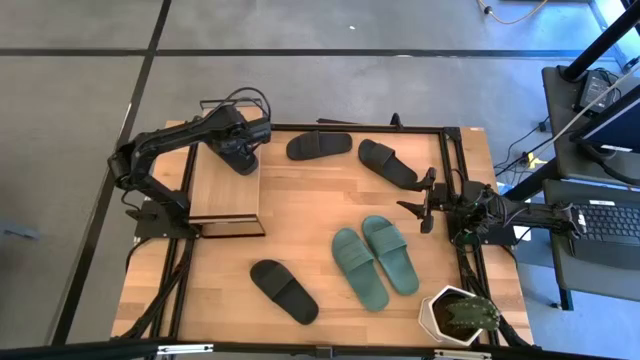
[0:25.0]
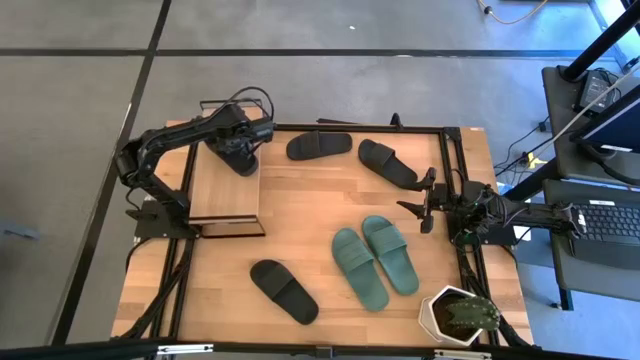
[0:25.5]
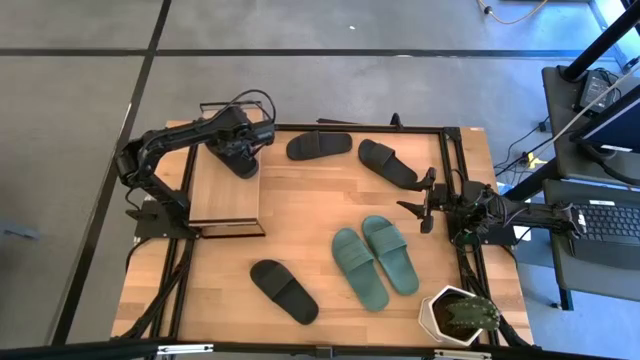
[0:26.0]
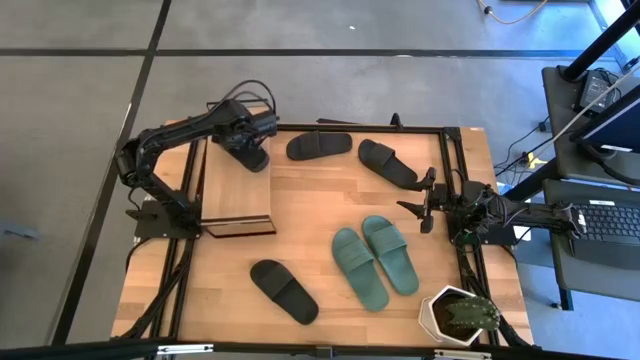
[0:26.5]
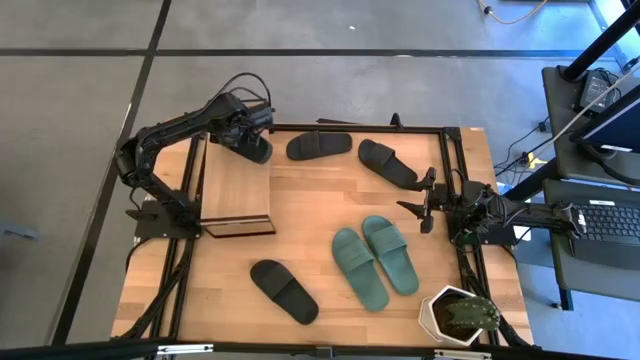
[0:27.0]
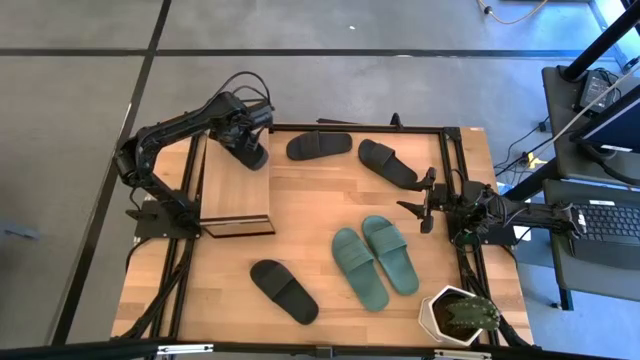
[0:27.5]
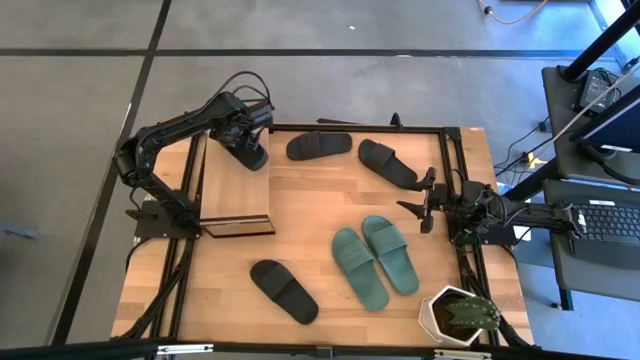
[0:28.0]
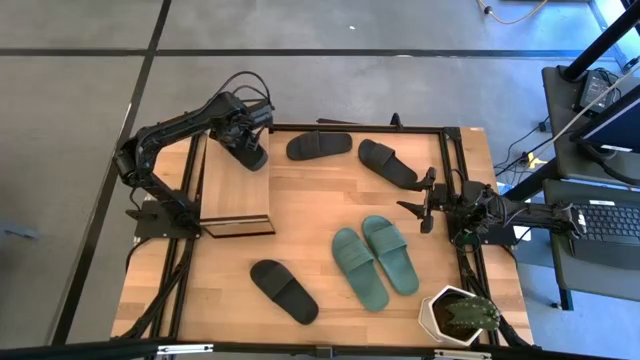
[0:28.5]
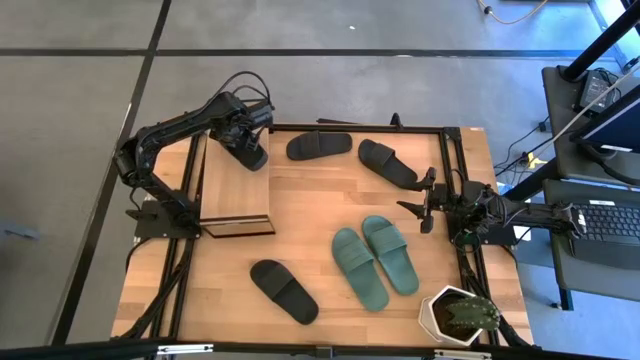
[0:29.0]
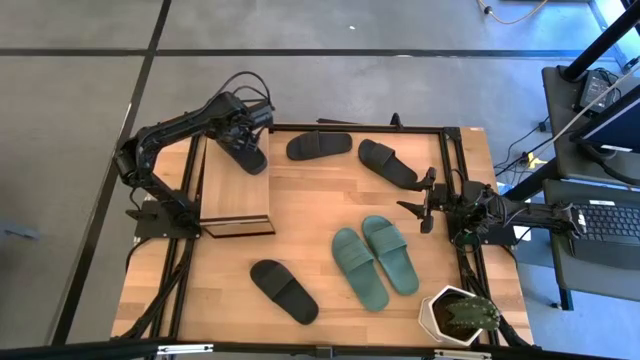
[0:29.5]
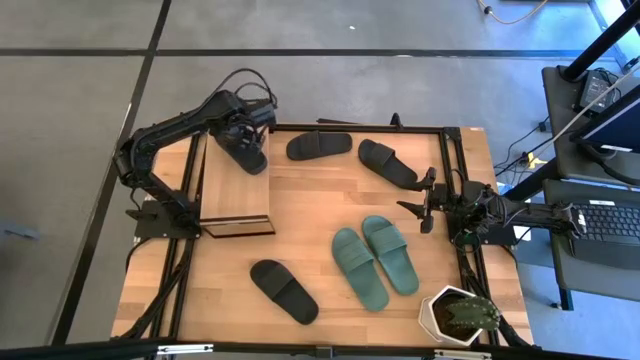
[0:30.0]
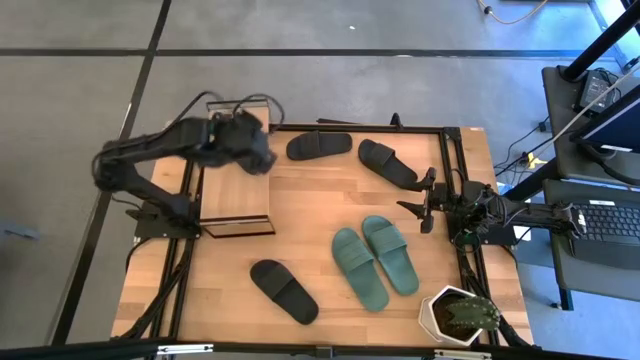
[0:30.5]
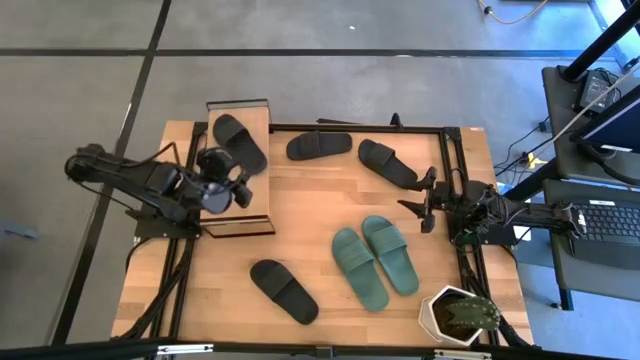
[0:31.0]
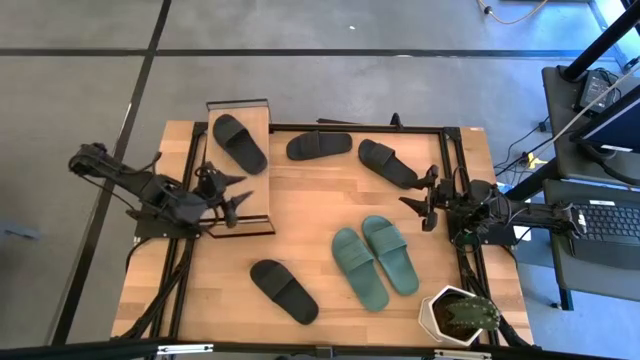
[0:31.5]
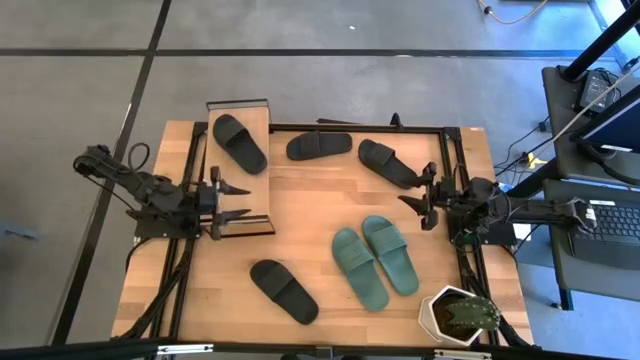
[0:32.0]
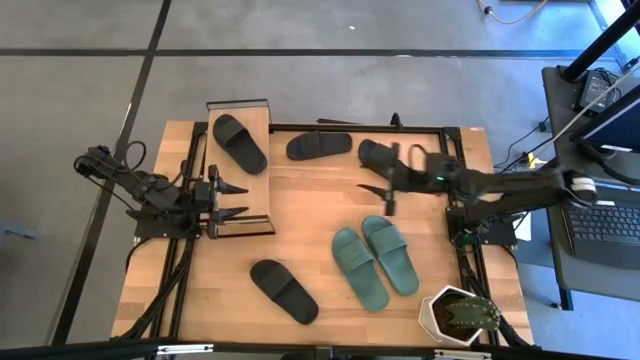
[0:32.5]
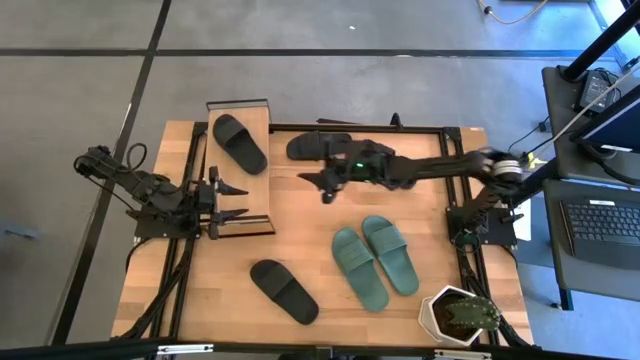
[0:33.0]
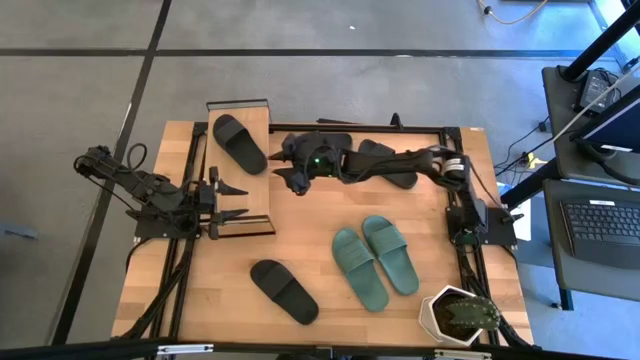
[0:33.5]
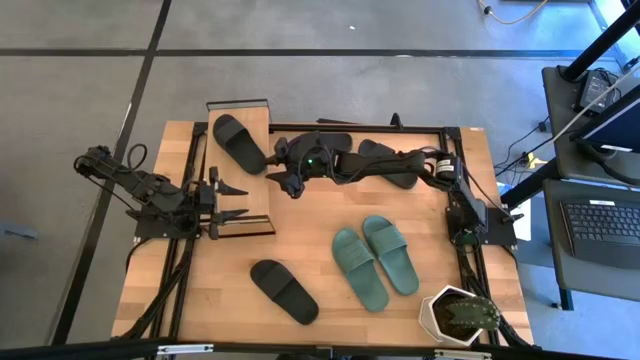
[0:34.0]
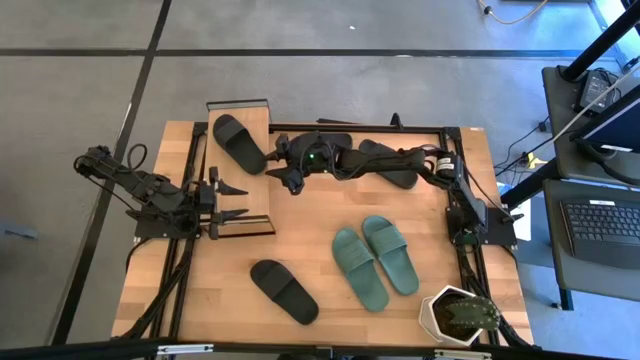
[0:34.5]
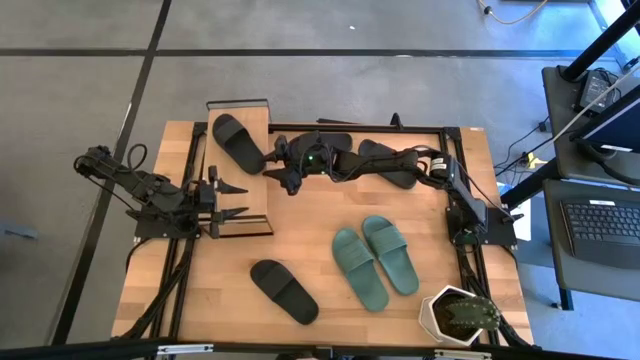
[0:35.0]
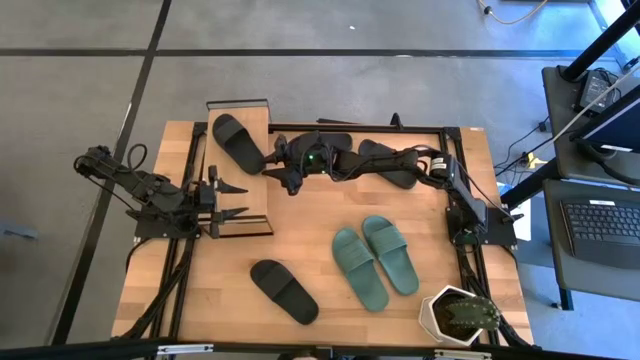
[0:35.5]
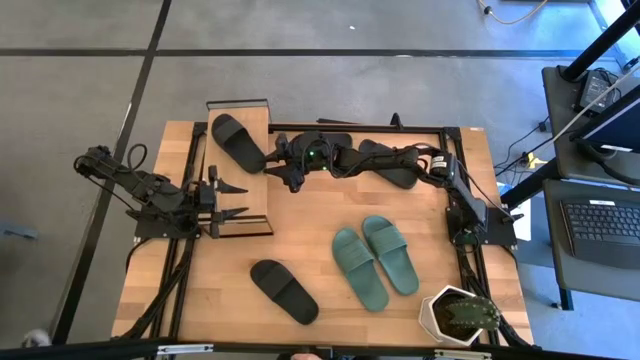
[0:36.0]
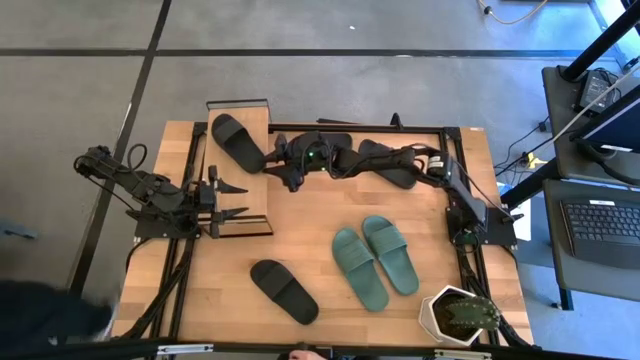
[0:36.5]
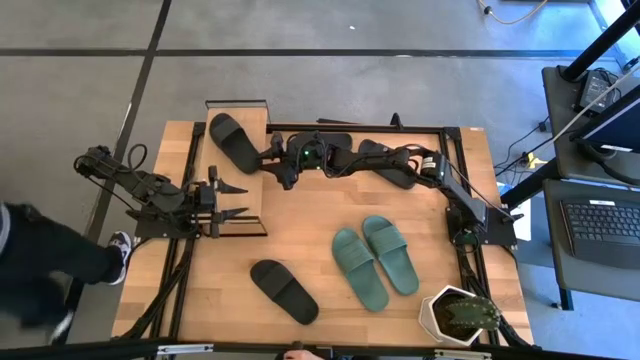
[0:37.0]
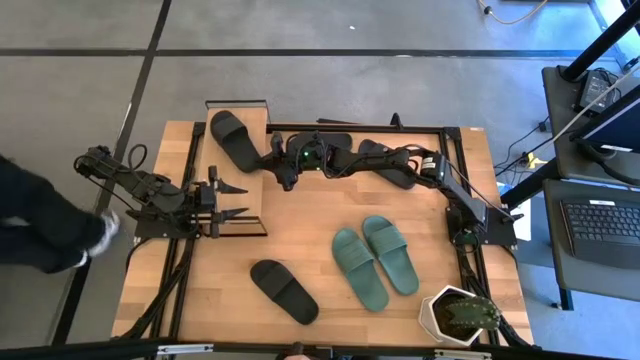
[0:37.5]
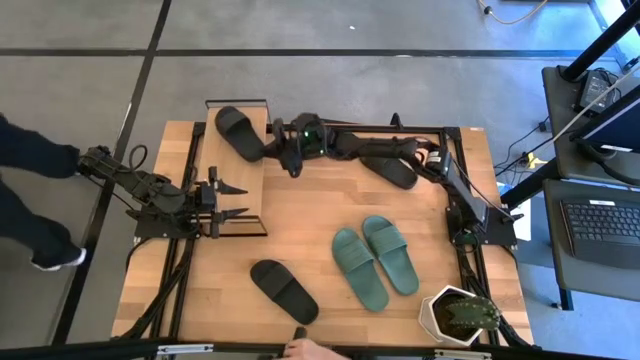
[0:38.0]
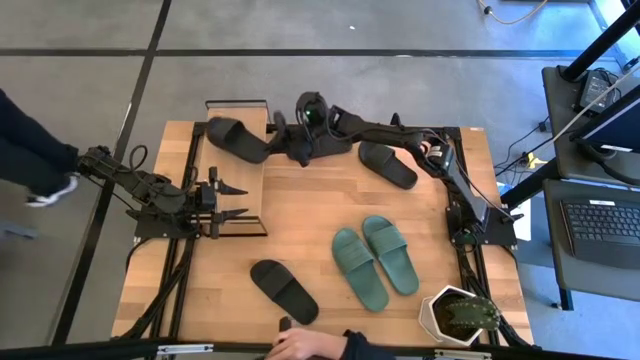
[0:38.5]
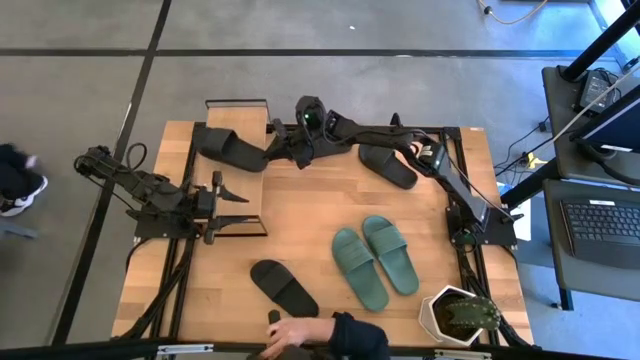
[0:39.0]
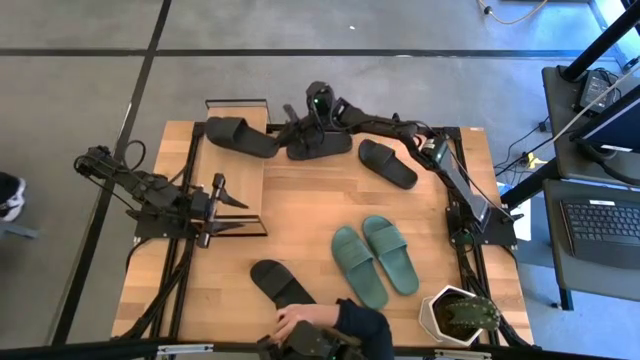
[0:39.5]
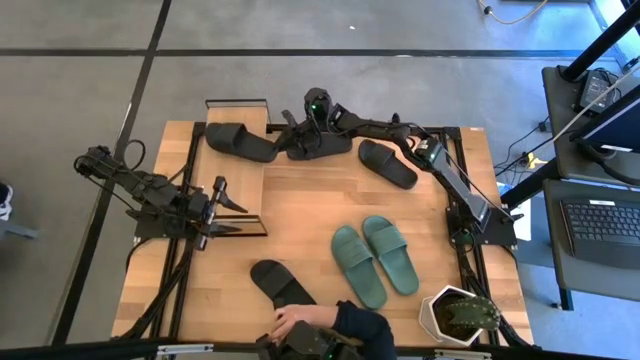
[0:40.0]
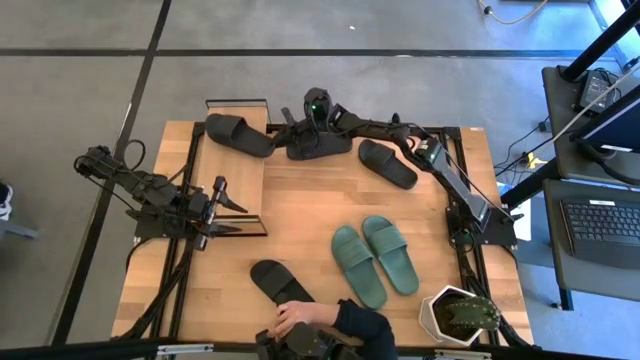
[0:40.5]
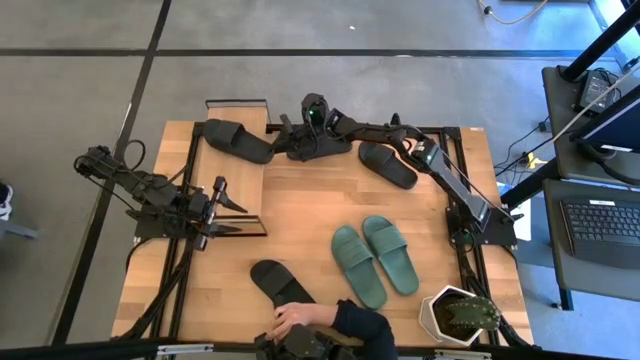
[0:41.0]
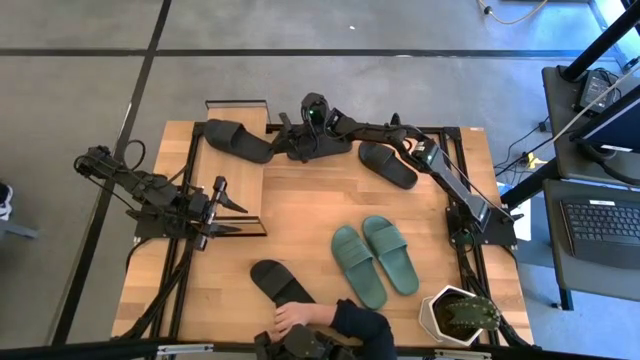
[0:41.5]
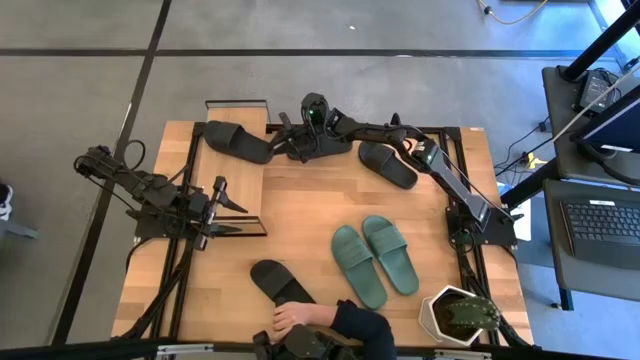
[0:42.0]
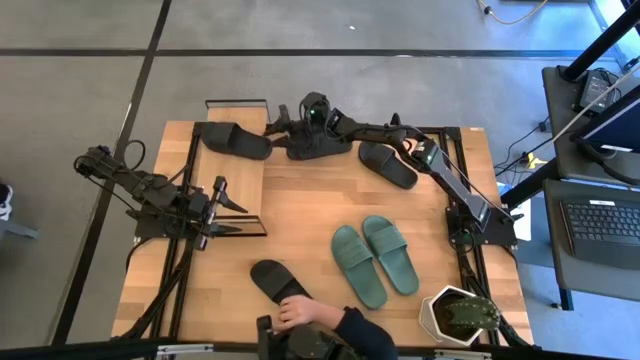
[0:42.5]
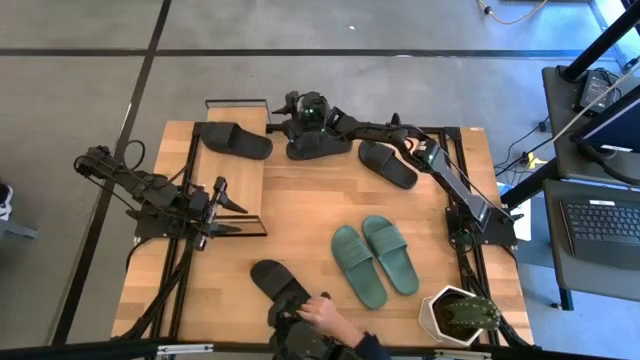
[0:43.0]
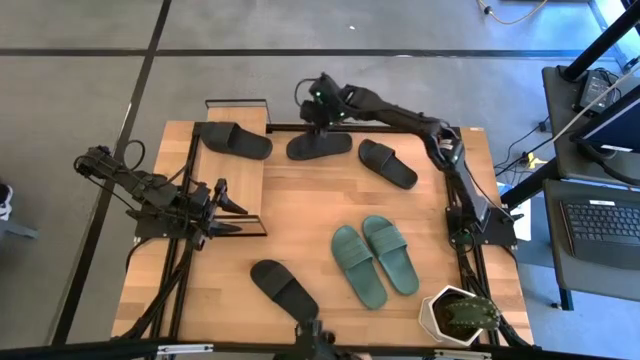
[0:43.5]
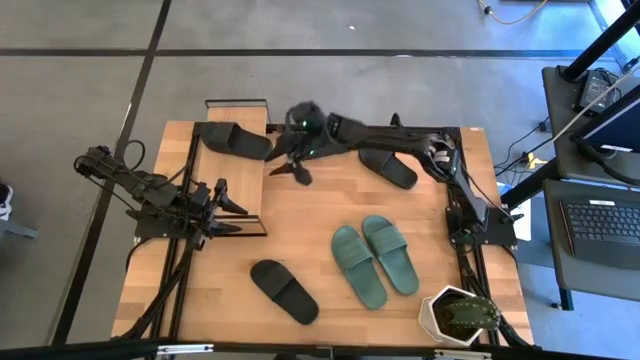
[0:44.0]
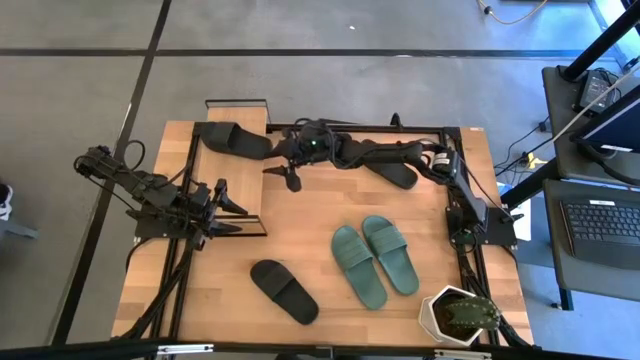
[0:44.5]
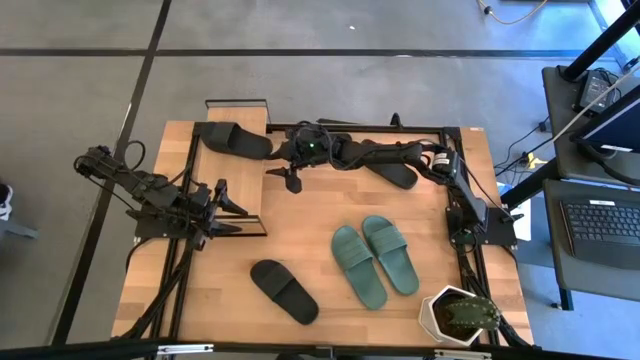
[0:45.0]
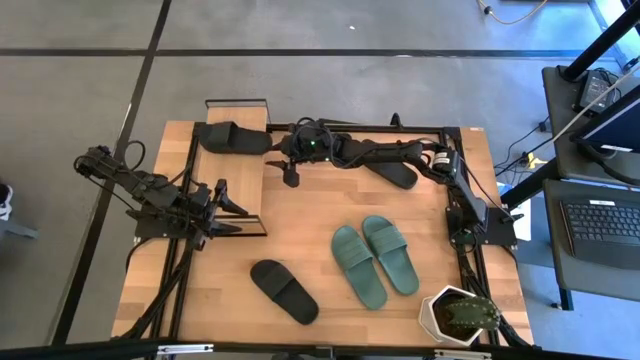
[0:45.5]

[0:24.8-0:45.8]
Task: Pick and place slides into the shelf
Put the black slipper on the shelf
